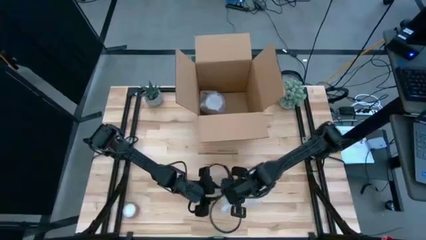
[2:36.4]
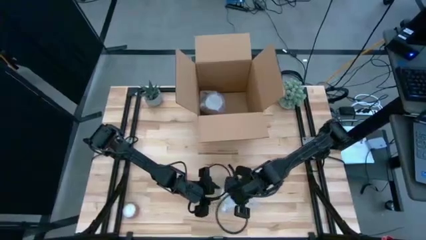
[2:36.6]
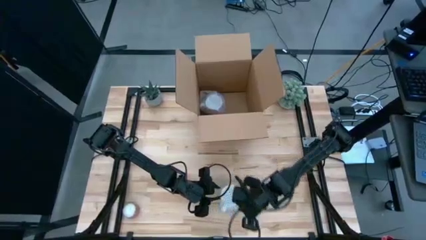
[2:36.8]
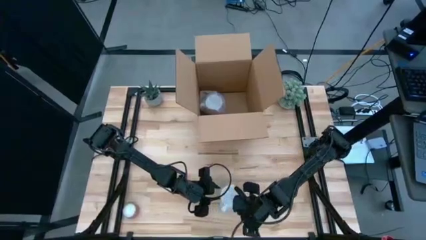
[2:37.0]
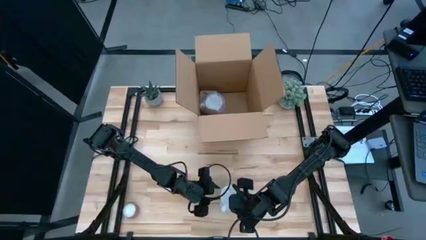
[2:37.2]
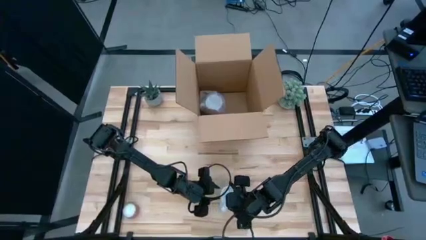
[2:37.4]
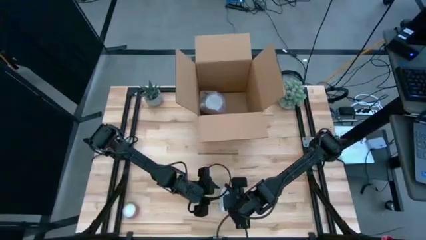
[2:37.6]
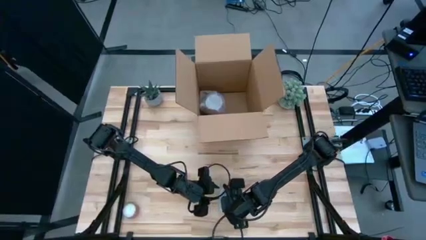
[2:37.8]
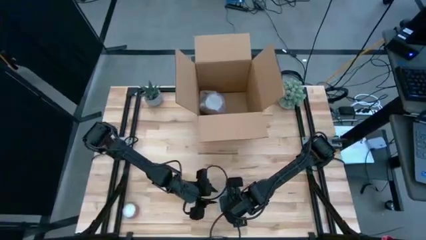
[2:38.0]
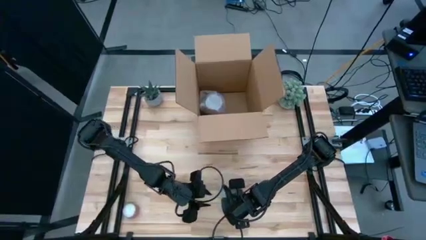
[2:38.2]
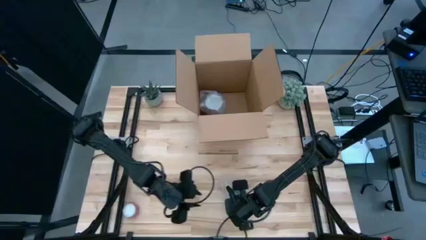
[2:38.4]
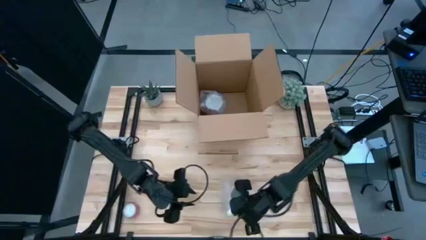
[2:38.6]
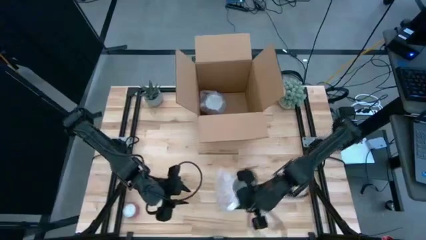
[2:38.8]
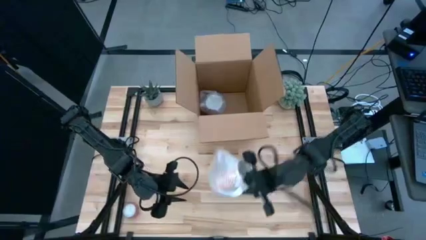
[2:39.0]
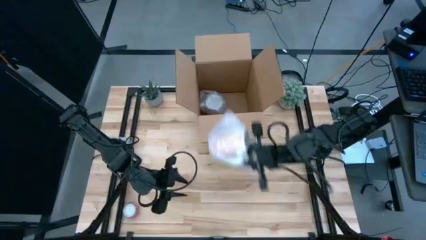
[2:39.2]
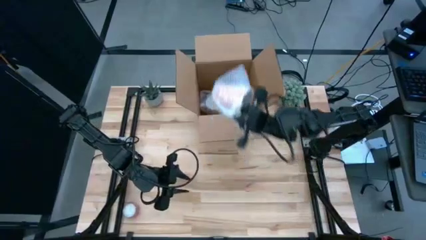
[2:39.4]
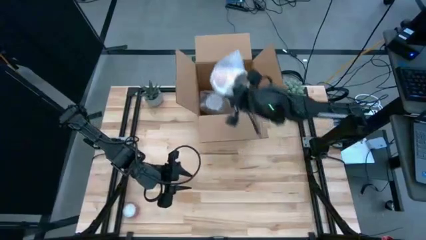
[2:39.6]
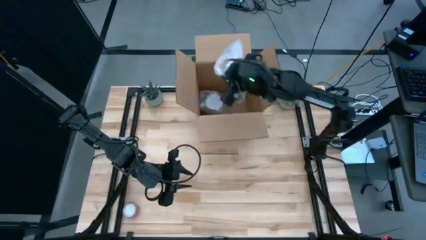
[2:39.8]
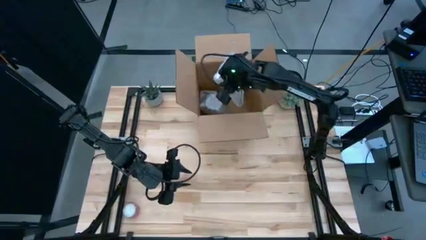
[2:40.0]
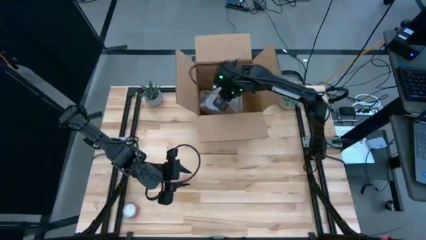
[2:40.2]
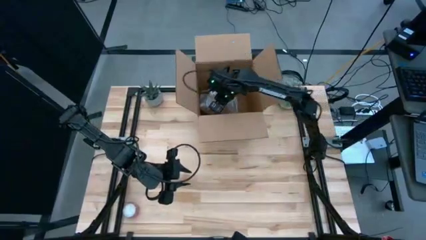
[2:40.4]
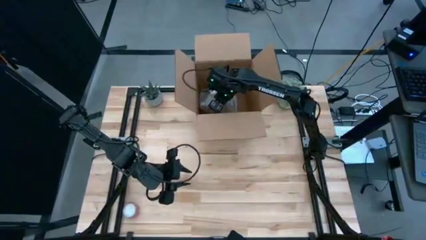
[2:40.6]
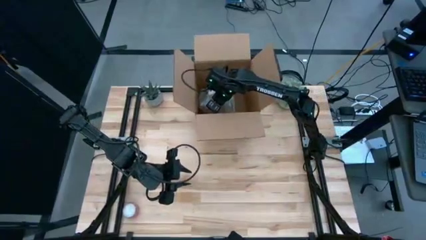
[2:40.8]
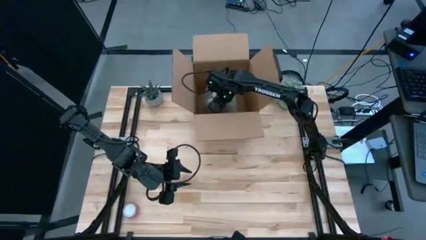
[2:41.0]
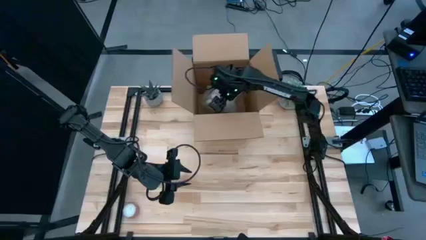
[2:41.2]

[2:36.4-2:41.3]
Task: wrap mug
Put the wrapped orange mug into the cardboard box

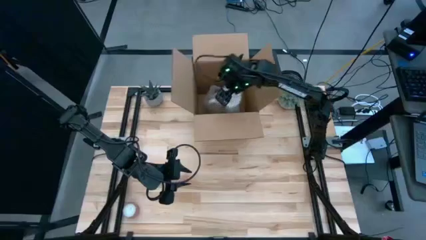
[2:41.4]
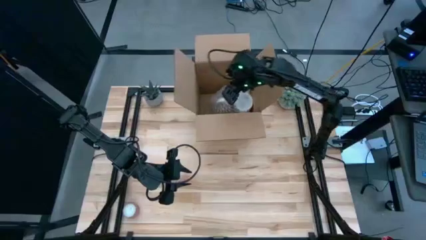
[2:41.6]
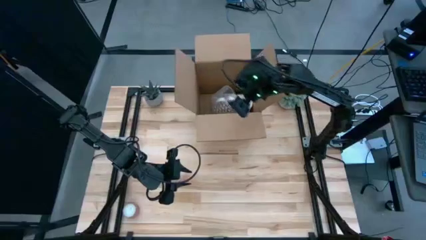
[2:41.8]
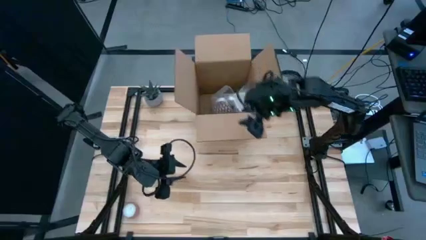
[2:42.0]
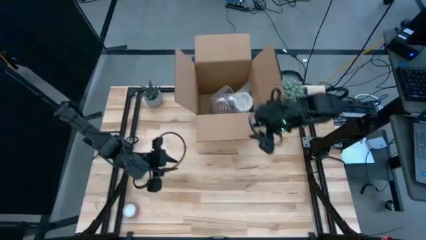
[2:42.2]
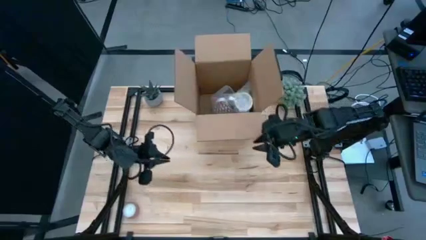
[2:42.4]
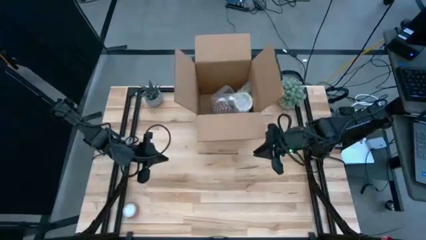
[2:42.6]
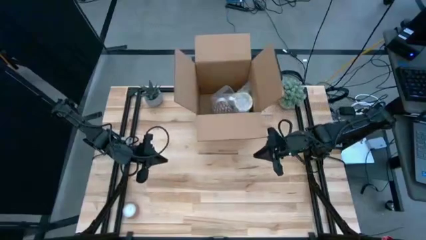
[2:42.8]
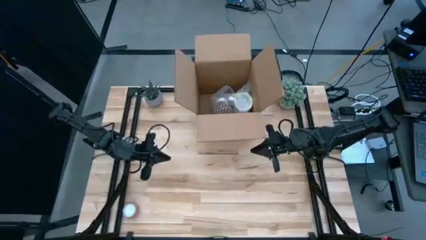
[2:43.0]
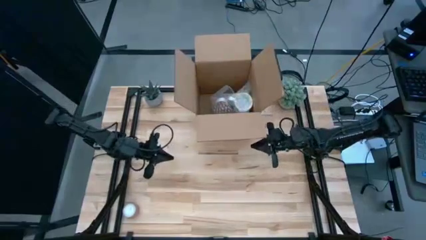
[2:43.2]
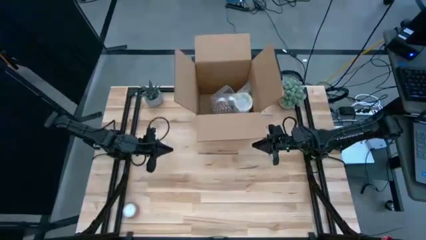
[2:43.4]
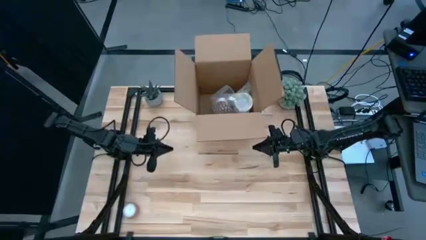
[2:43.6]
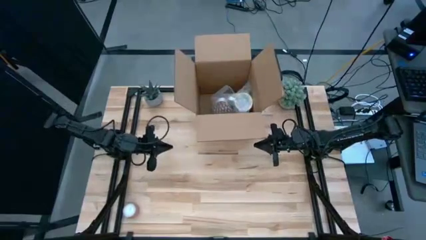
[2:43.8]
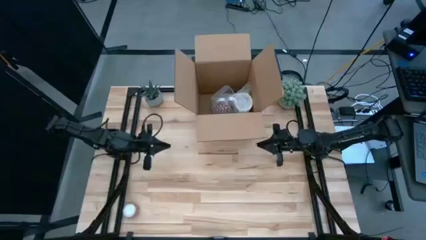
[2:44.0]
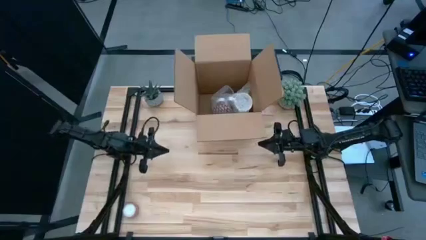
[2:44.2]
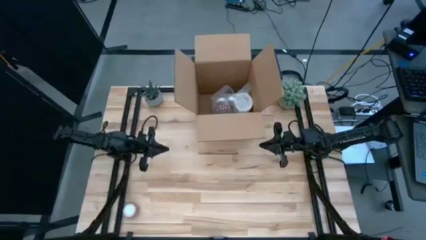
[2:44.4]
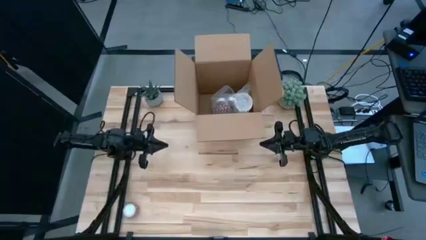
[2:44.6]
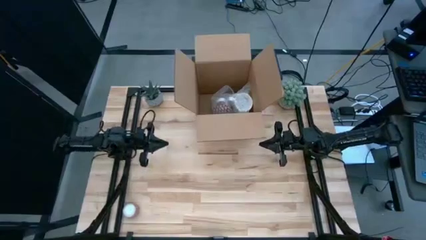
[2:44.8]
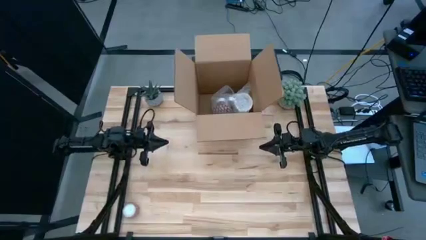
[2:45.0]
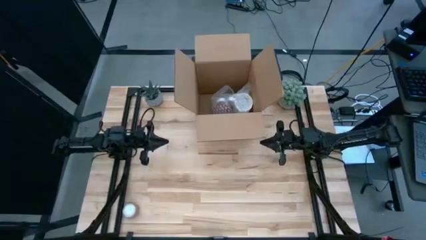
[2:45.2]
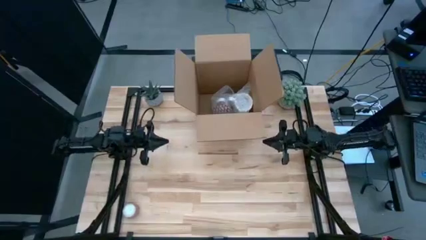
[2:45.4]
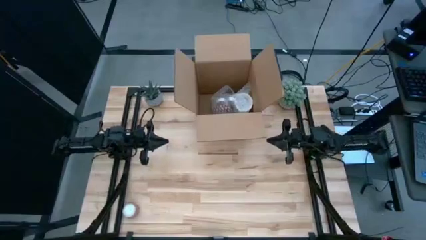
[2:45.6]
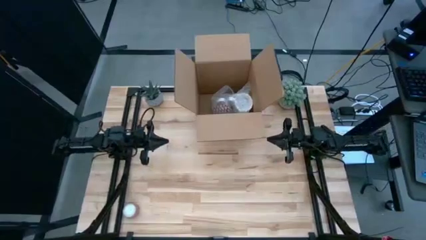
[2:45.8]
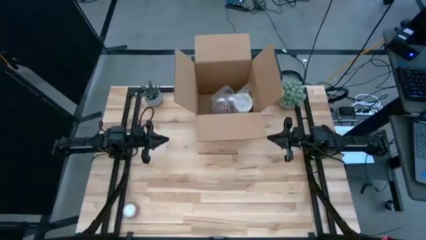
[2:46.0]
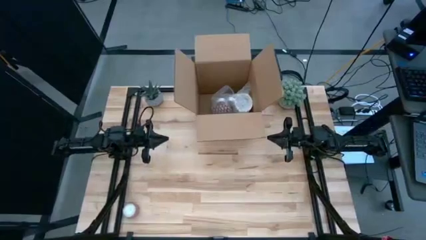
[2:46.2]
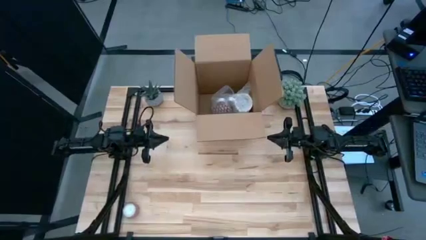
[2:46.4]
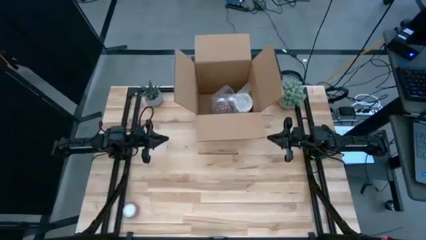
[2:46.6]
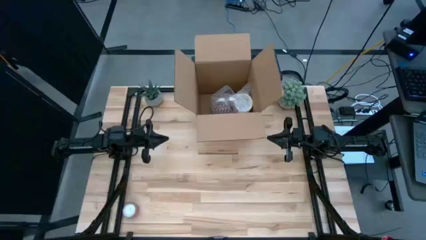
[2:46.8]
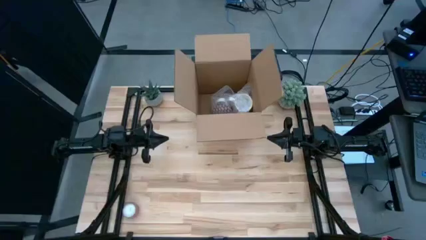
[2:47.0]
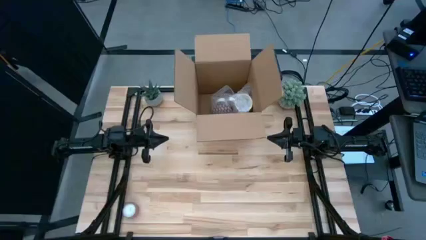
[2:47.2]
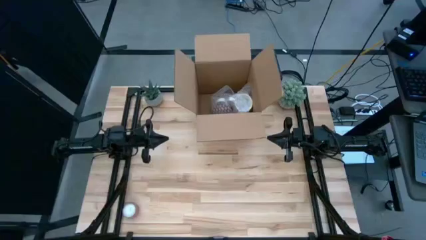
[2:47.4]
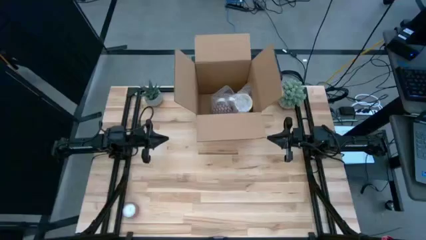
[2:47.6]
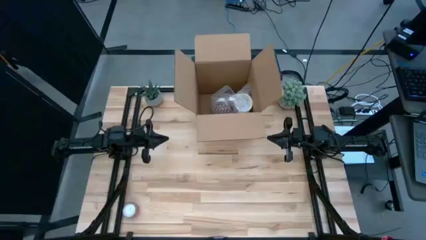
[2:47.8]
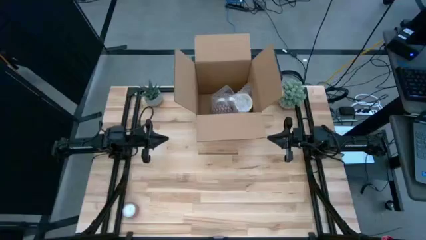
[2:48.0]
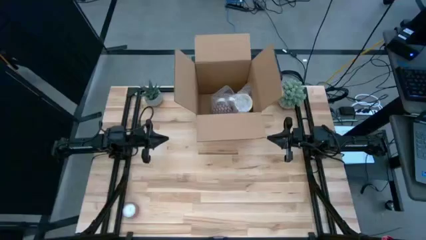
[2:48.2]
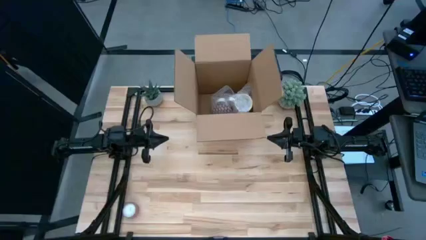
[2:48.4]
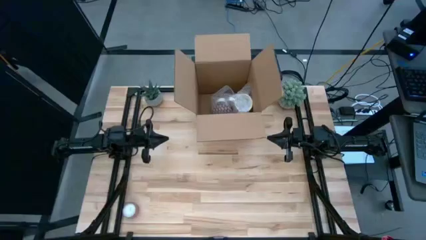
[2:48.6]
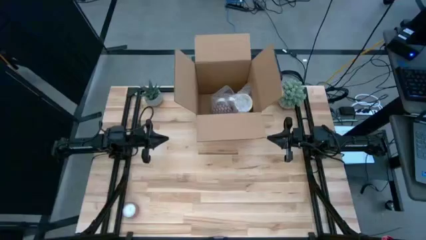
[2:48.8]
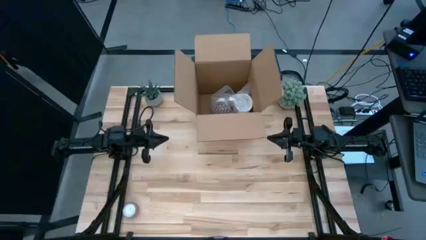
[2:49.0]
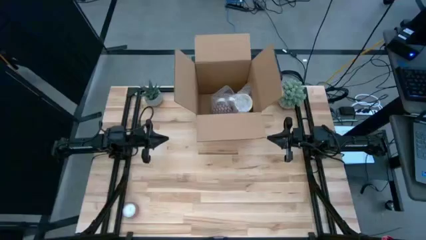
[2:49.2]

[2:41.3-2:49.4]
Return to Home Position
